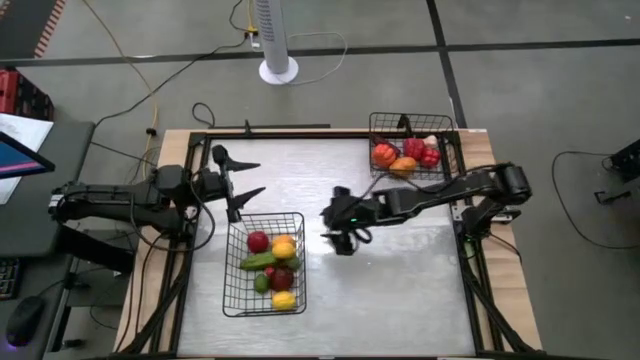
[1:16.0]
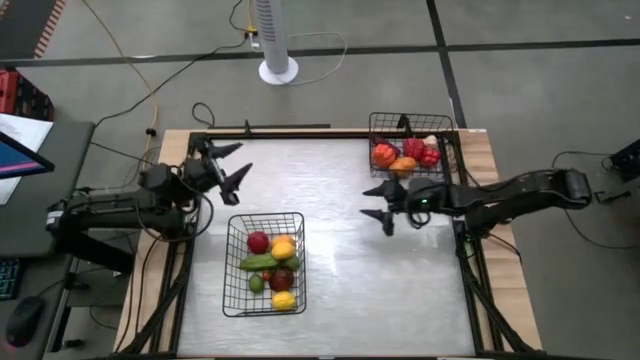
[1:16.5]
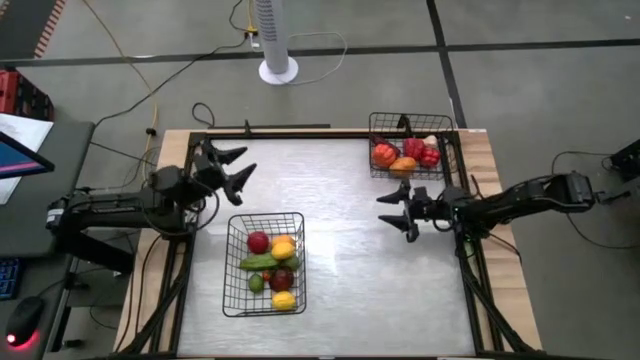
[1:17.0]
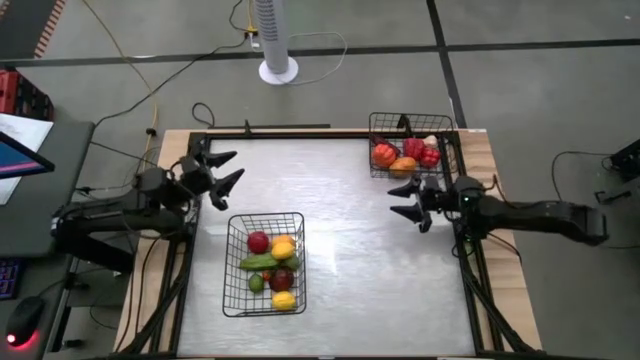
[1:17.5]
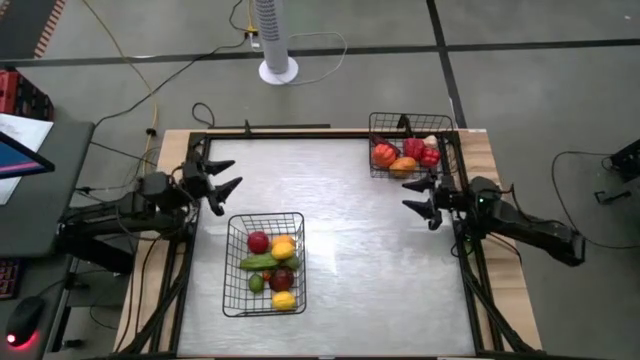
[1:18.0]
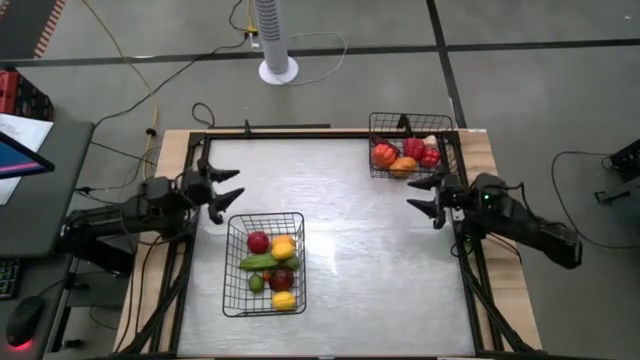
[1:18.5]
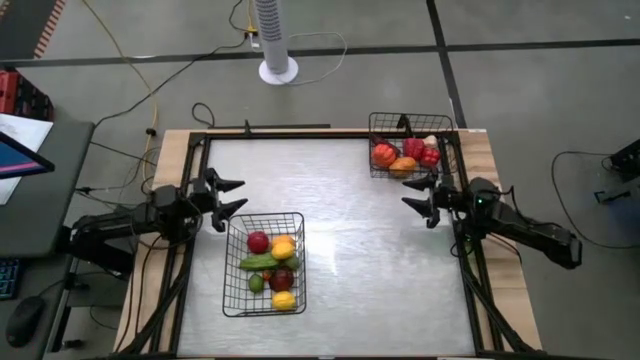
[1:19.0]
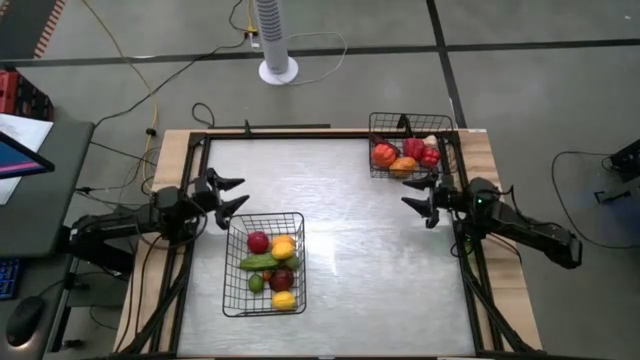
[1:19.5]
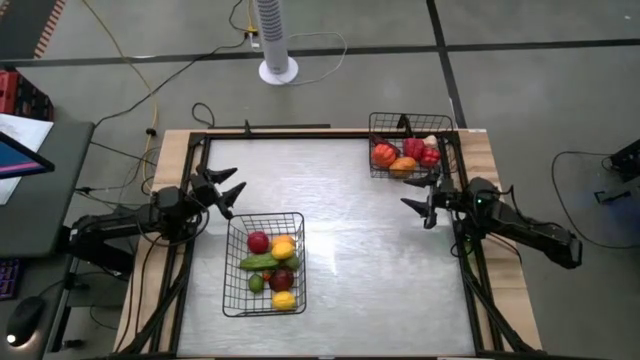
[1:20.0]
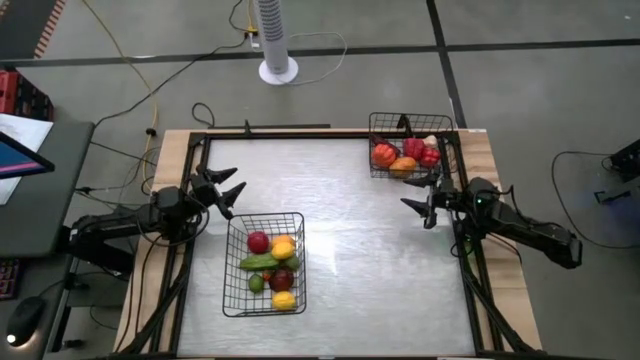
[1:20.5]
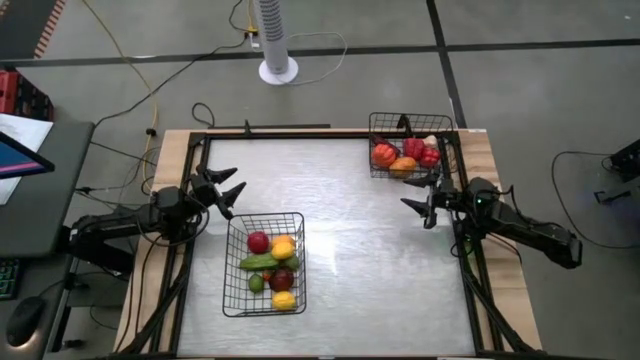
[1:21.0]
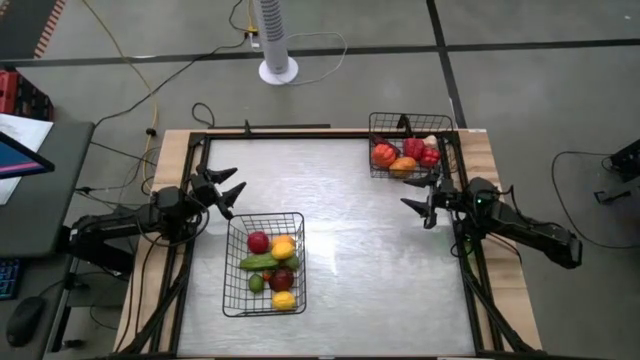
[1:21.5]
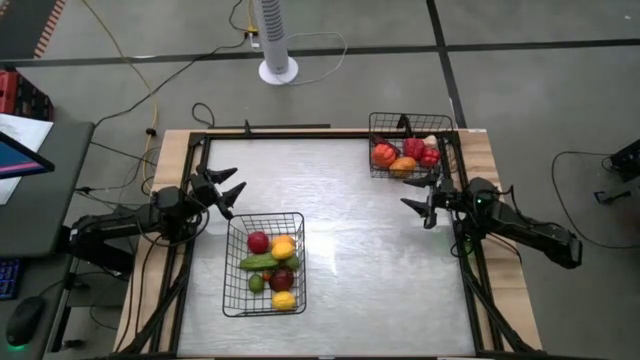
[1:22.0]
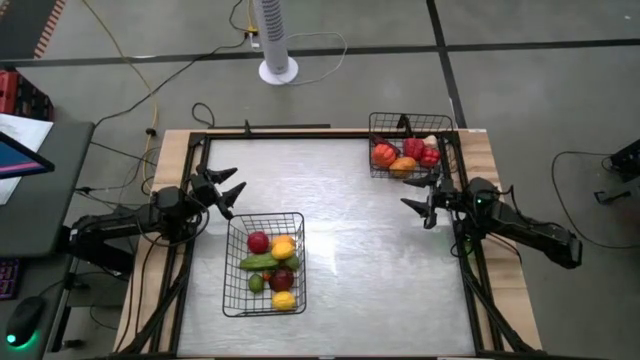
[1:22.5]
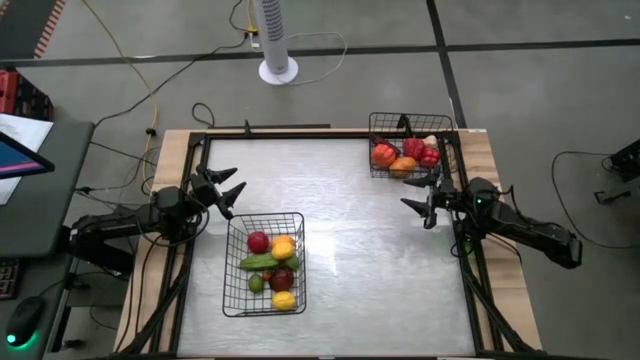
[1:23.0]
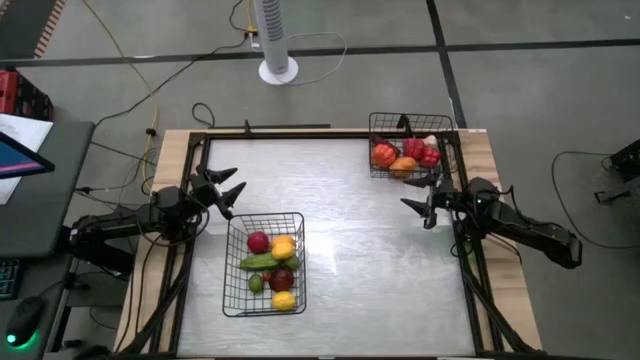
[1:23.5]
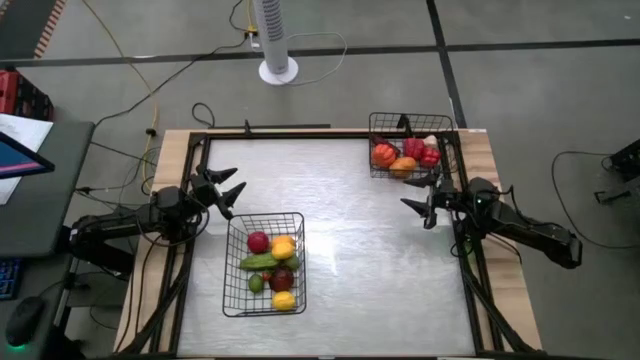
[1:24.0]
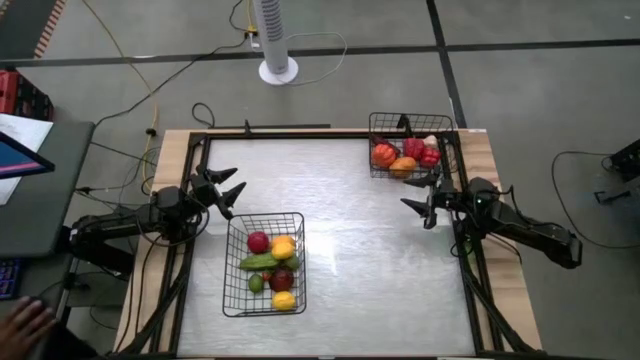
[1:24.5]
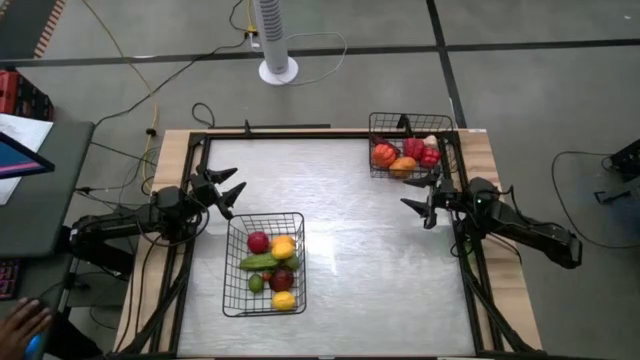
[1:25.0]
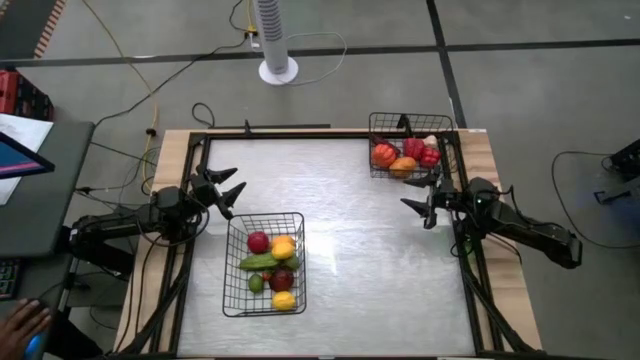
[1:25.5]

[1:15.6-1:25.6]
Task: Sort produce into baskets
Return to Home Position

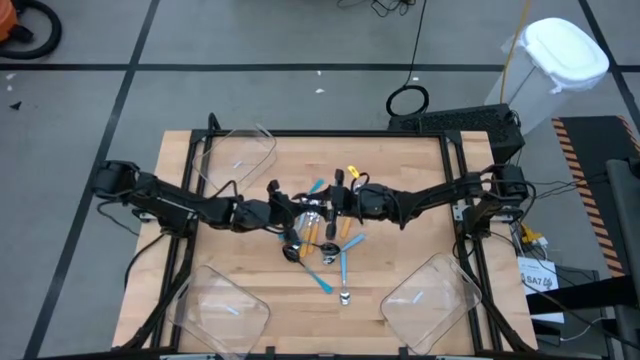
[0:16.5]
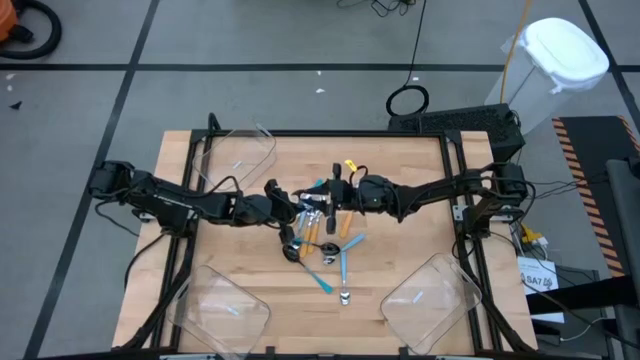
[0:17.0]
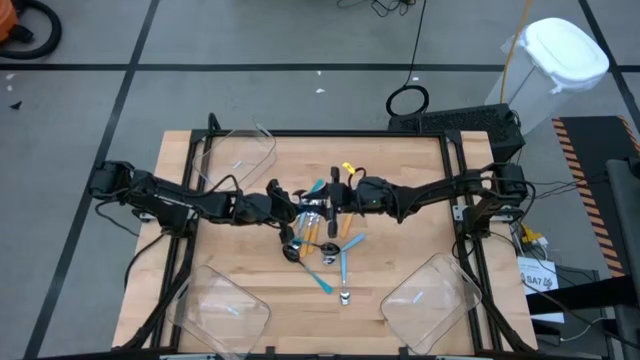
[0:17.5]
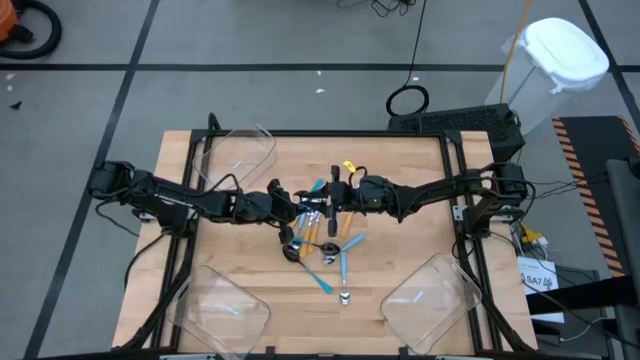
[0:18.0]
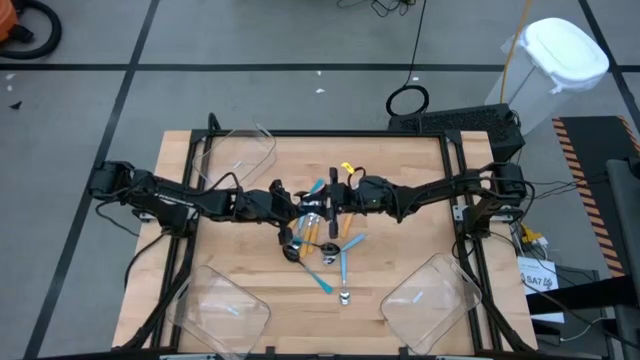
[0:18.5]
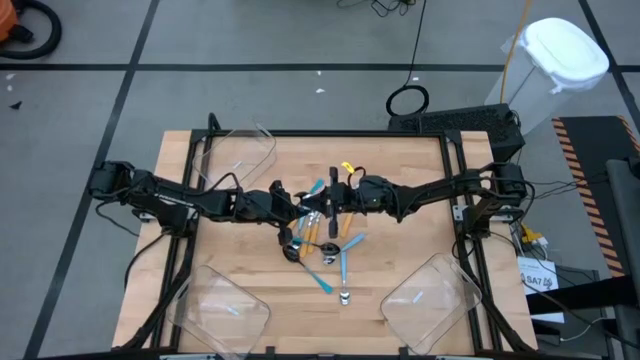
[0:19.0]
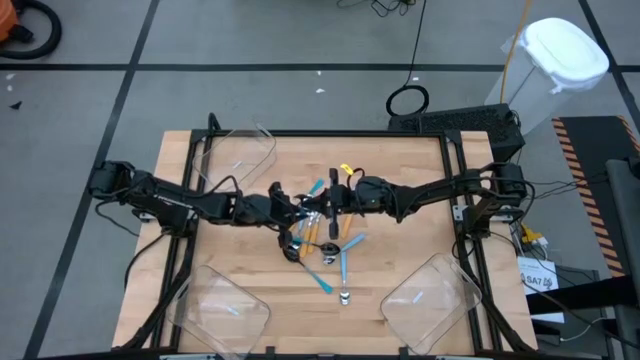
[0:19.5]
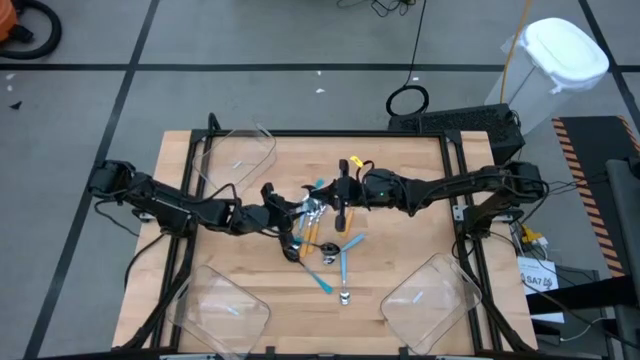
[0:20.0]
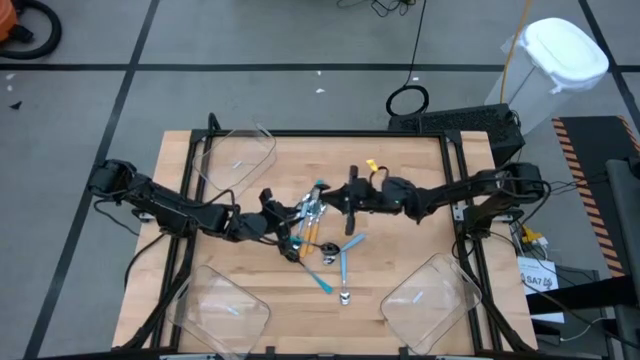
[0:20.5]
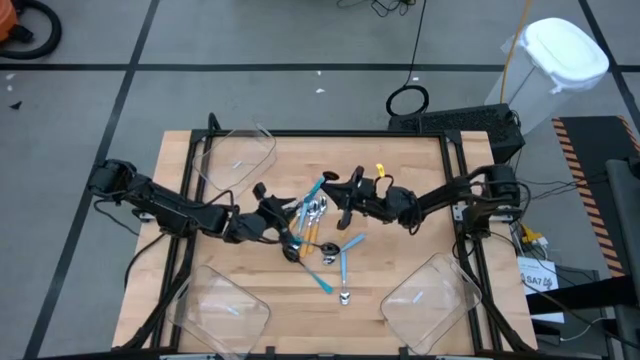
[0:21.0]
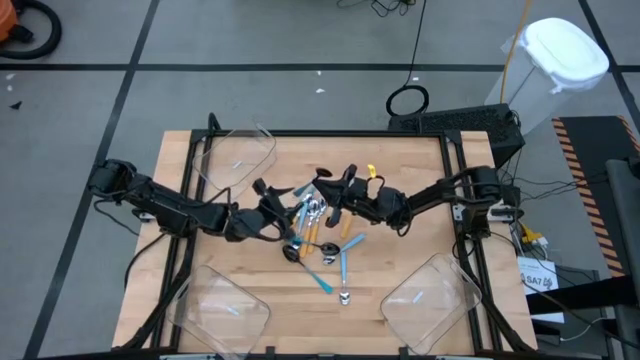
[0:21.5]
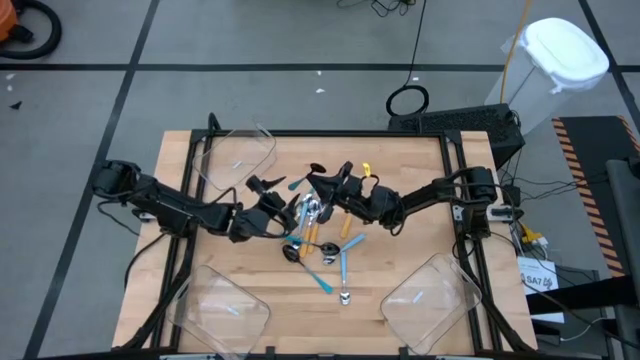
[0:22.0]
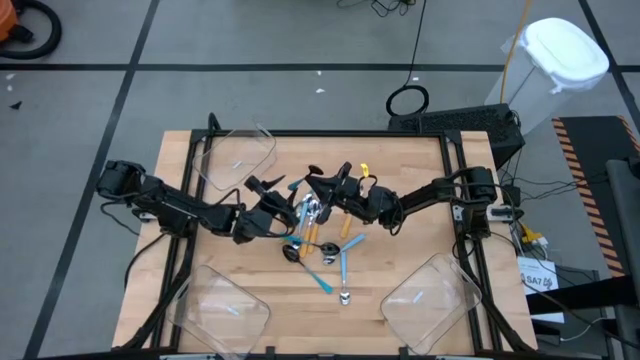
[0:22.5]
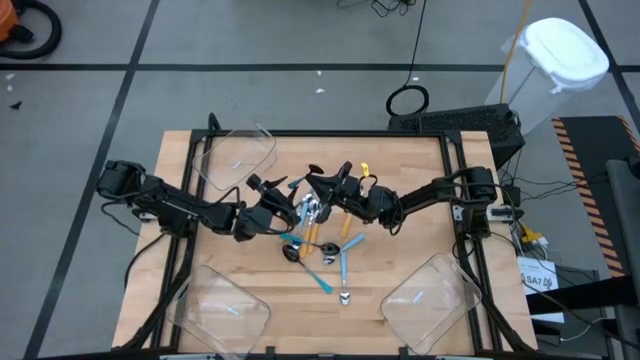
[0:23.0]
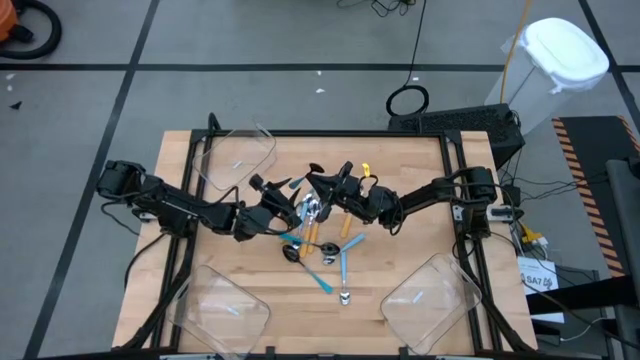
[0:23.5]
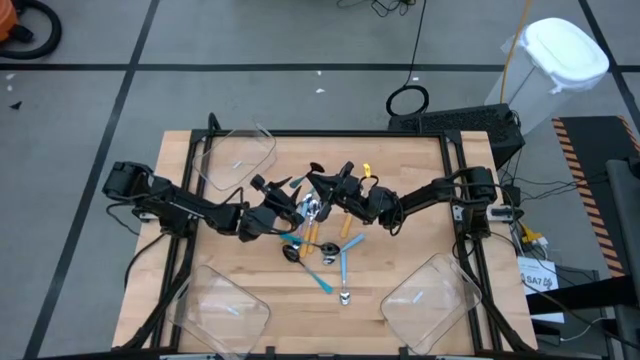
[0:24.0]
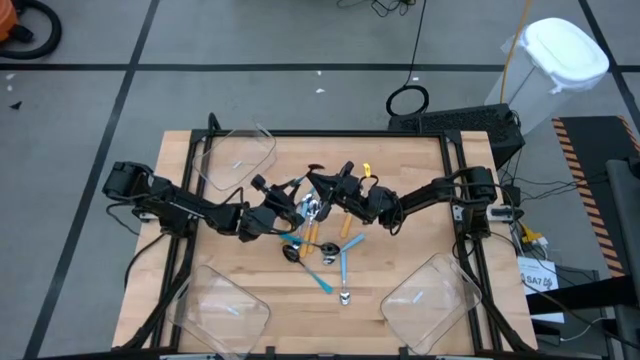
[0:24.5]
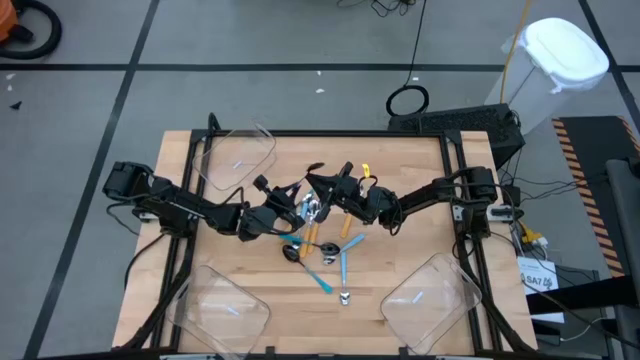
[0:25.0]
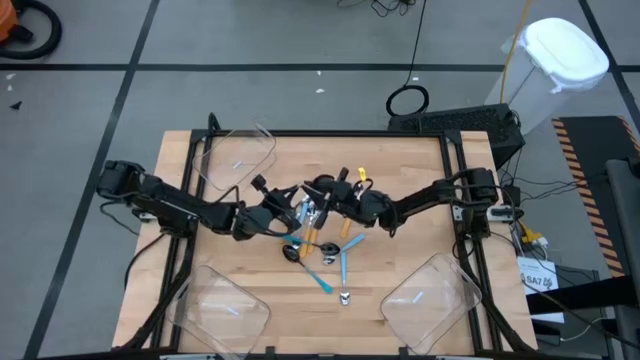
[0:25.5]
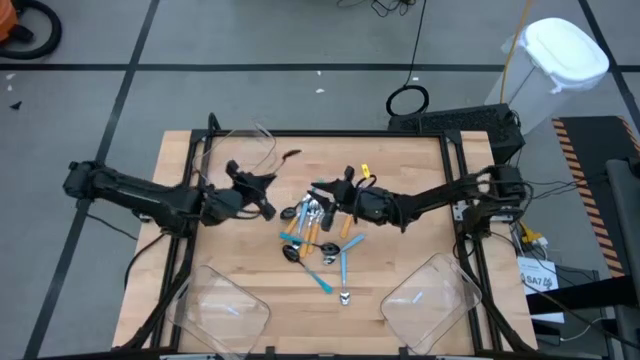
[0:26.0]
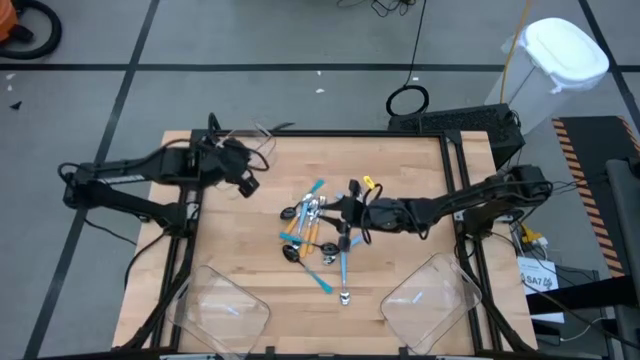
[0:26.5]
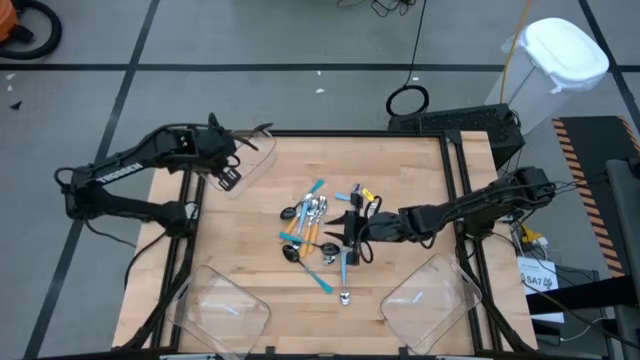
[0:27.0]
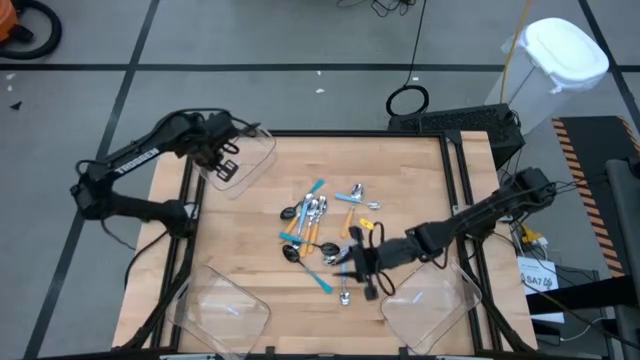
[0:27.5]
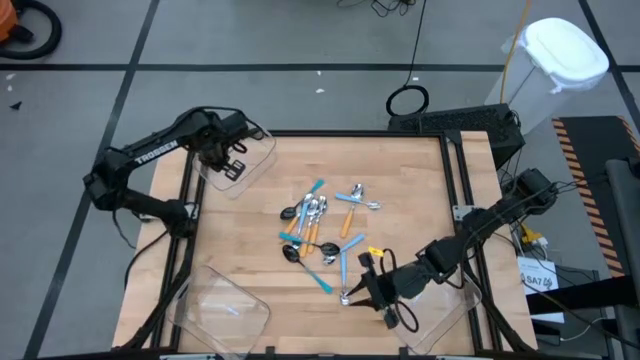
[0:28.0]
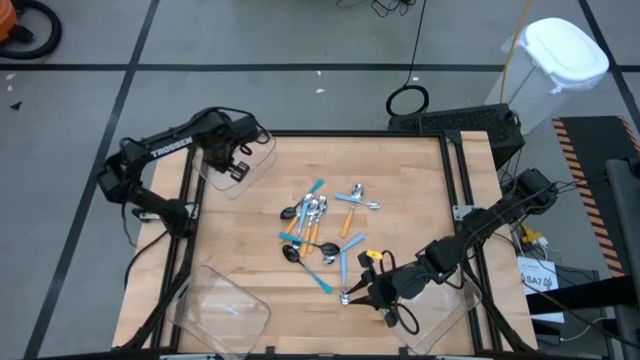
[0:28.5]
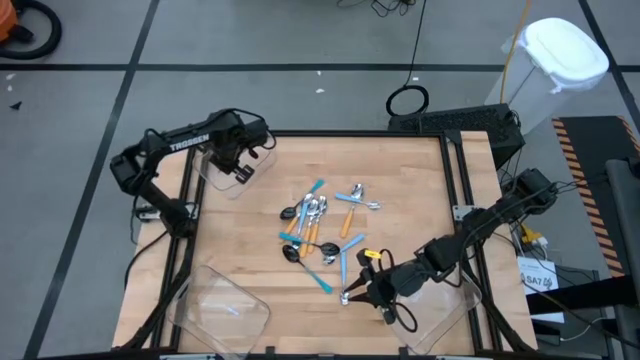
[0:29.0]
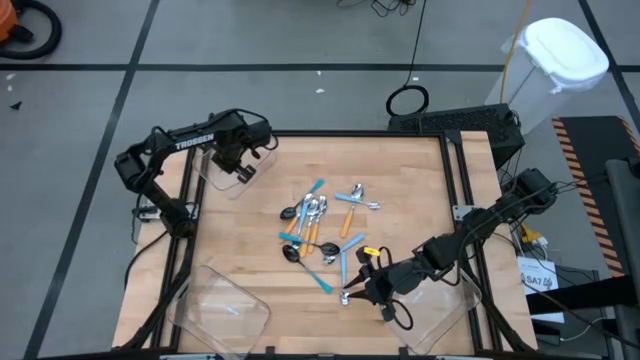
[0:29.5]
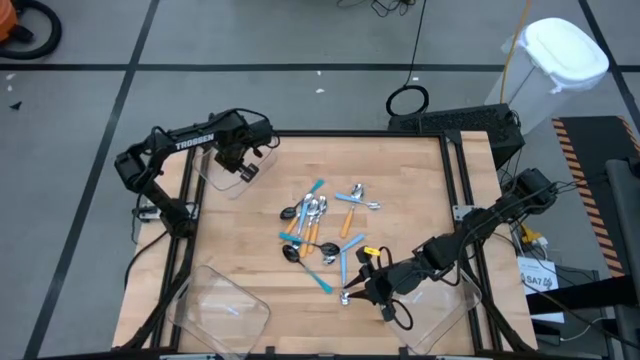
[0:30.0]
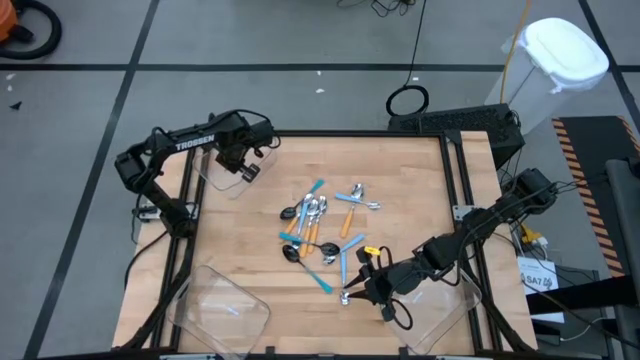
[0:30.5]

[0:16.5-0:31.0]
Task: Sort silverware by color (type)
Put the blue spoon into the top left transparent bin
